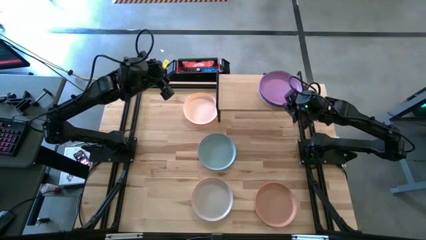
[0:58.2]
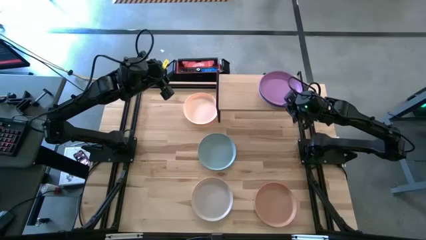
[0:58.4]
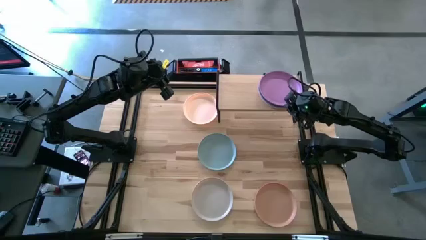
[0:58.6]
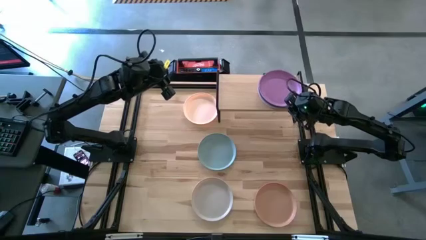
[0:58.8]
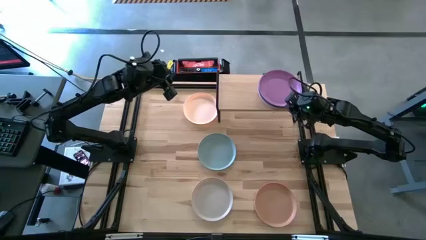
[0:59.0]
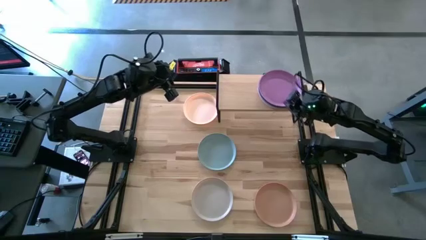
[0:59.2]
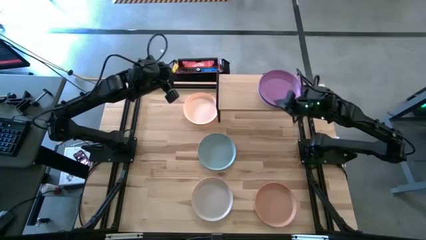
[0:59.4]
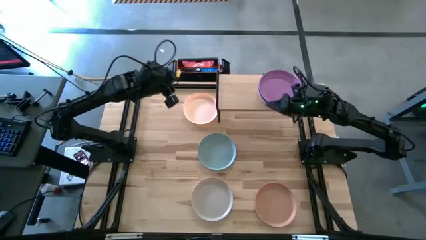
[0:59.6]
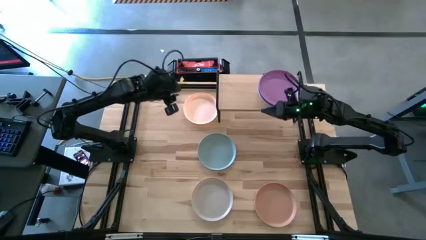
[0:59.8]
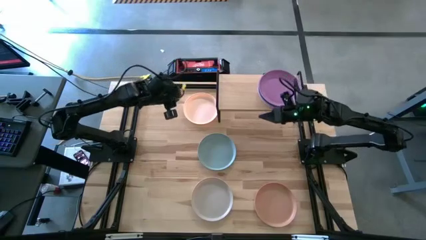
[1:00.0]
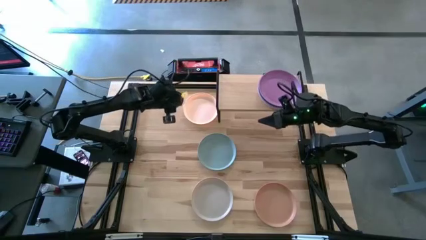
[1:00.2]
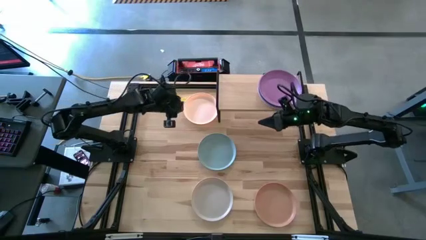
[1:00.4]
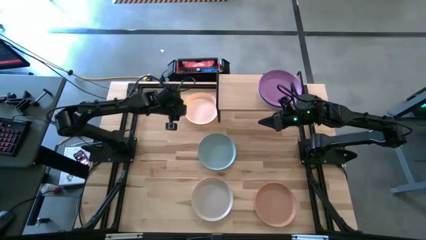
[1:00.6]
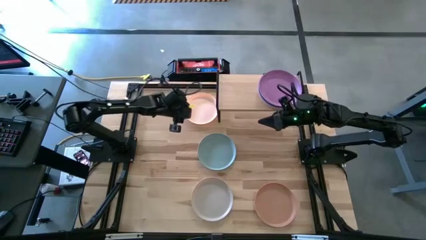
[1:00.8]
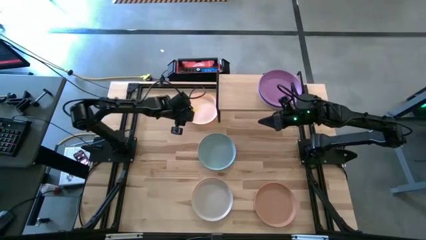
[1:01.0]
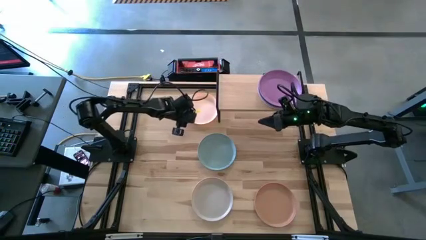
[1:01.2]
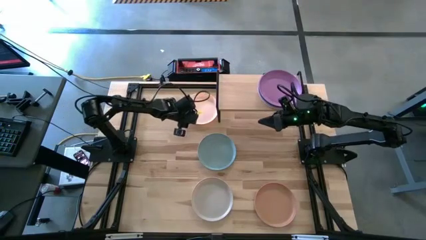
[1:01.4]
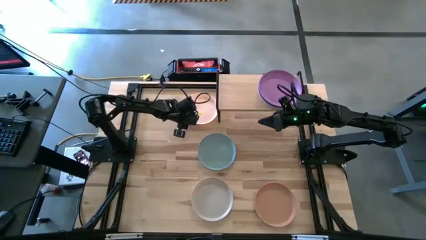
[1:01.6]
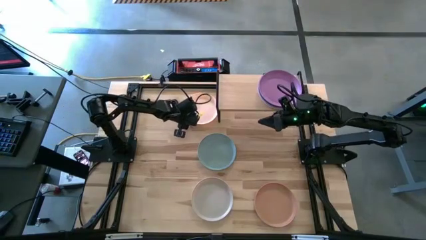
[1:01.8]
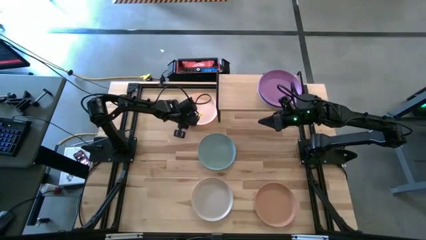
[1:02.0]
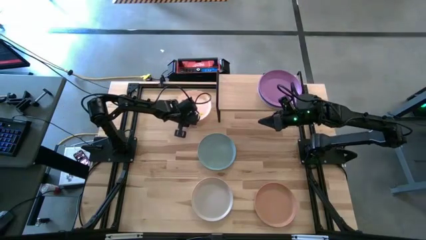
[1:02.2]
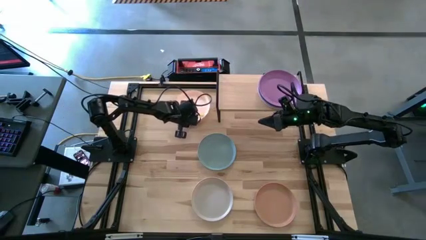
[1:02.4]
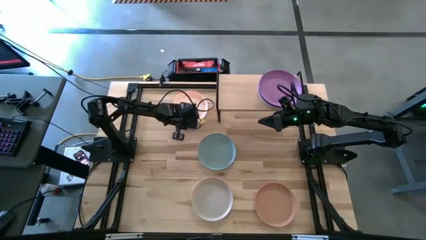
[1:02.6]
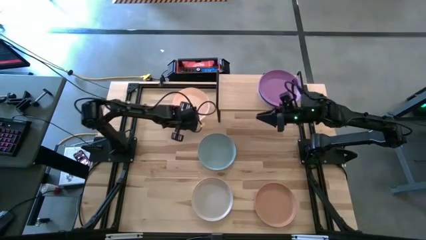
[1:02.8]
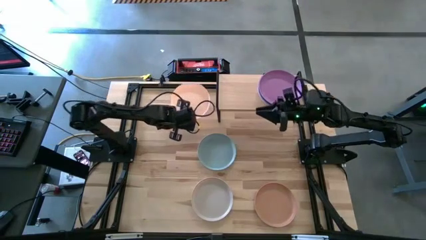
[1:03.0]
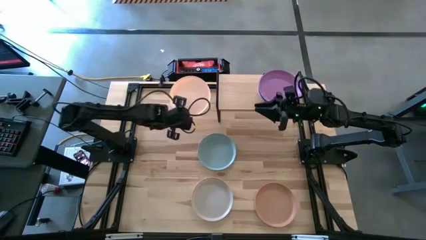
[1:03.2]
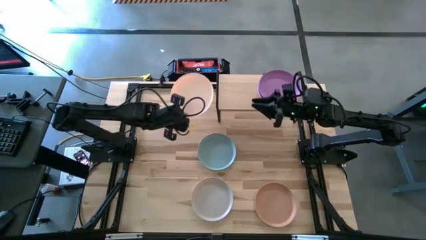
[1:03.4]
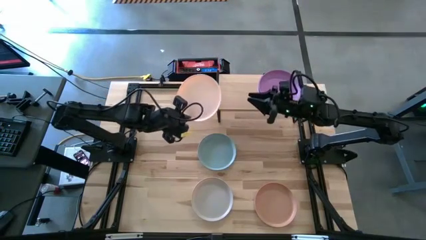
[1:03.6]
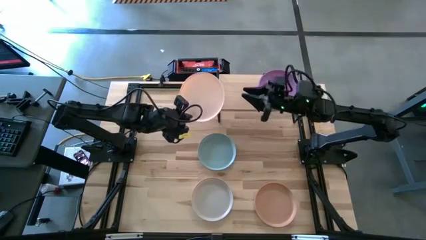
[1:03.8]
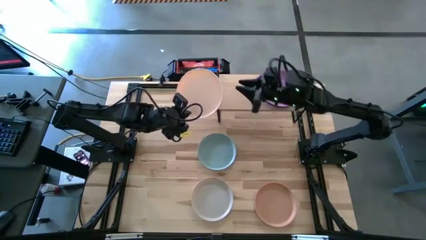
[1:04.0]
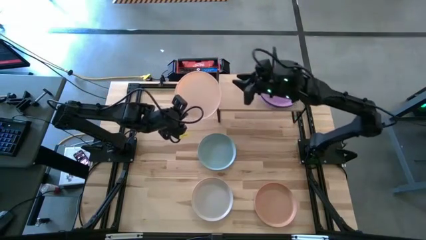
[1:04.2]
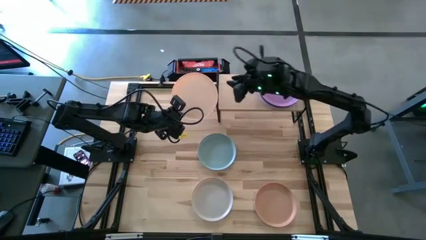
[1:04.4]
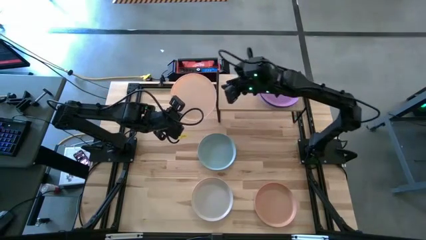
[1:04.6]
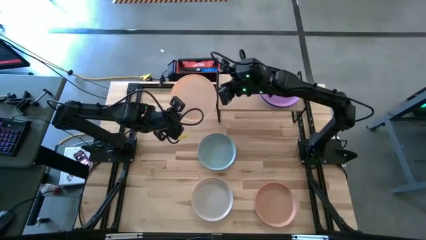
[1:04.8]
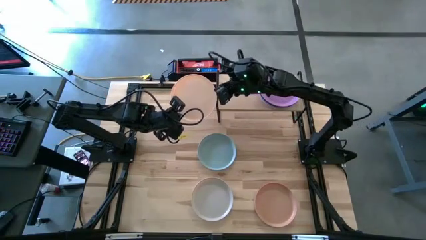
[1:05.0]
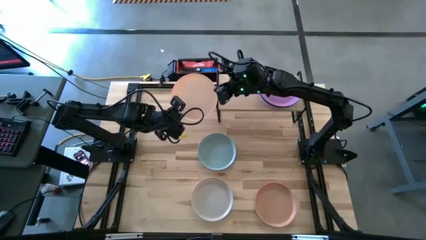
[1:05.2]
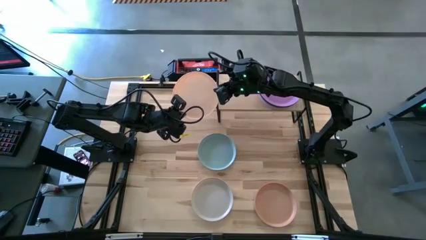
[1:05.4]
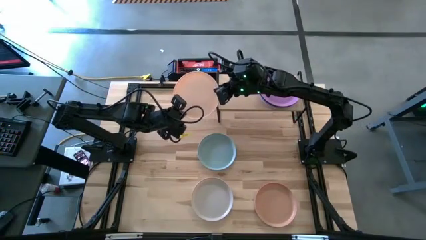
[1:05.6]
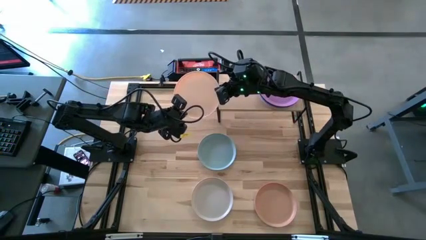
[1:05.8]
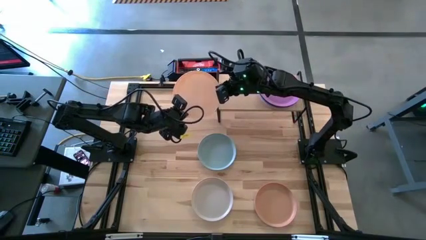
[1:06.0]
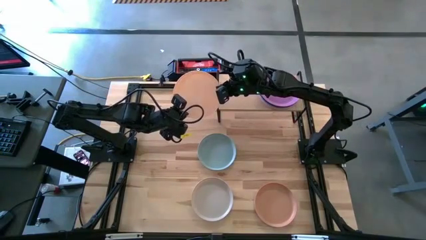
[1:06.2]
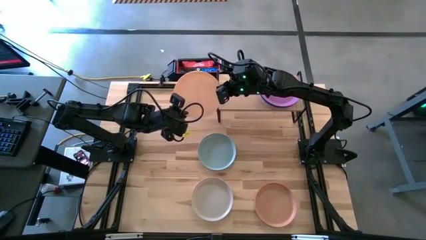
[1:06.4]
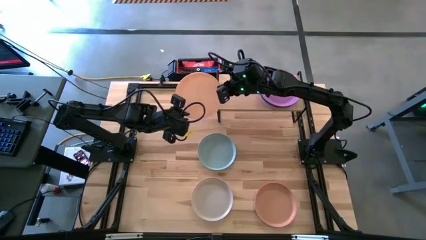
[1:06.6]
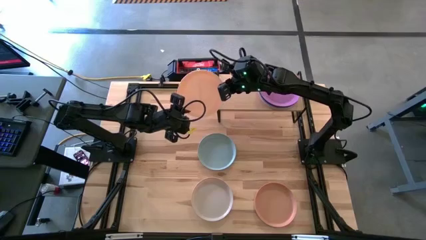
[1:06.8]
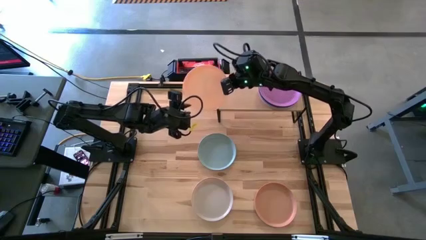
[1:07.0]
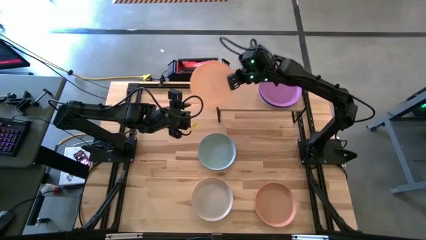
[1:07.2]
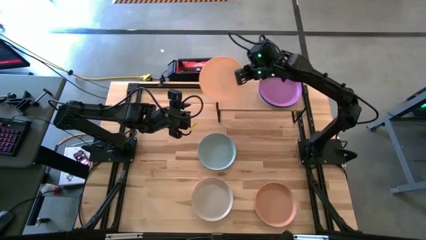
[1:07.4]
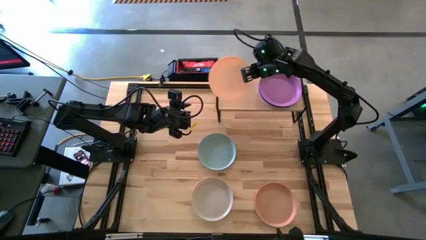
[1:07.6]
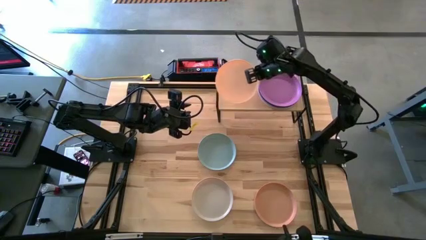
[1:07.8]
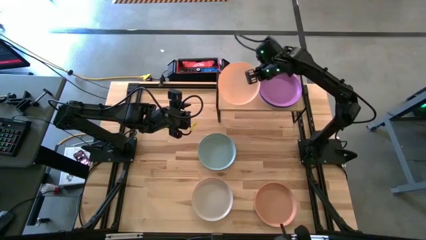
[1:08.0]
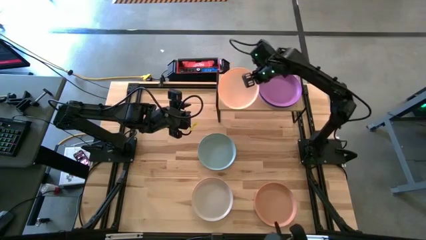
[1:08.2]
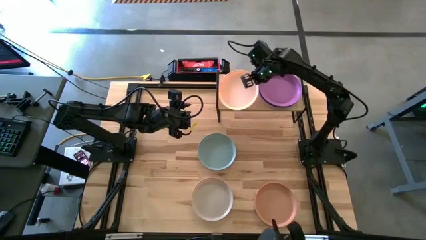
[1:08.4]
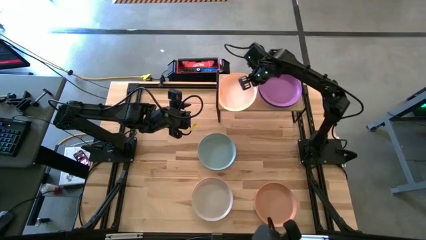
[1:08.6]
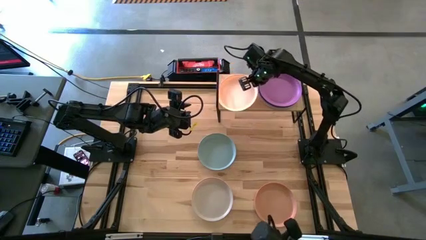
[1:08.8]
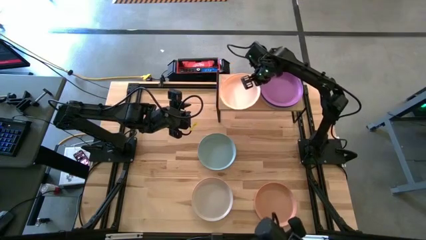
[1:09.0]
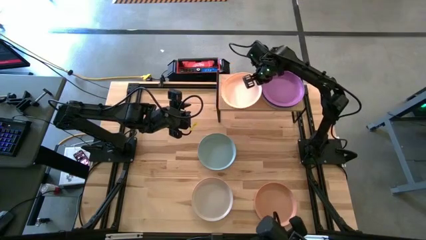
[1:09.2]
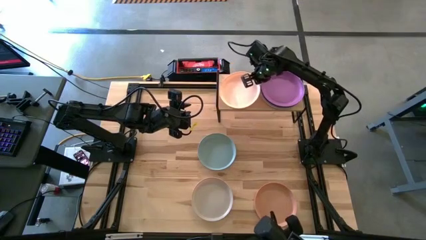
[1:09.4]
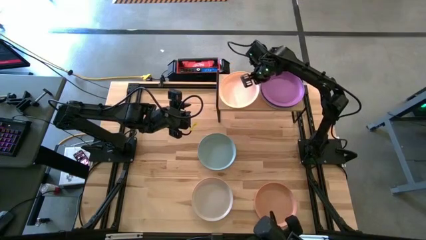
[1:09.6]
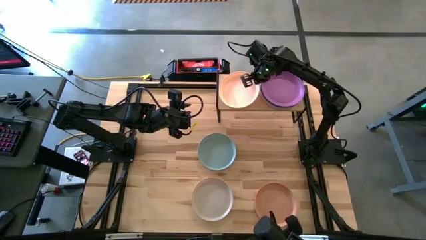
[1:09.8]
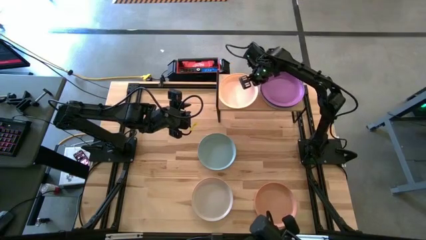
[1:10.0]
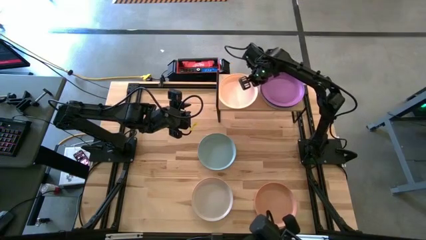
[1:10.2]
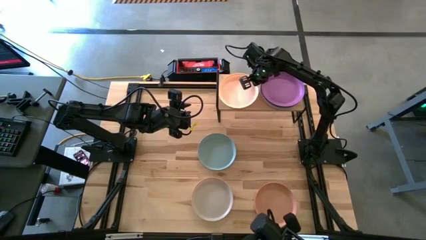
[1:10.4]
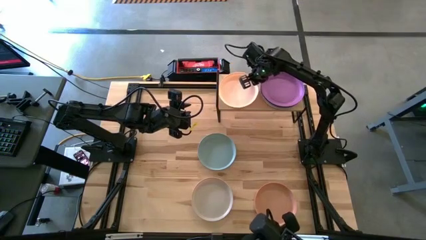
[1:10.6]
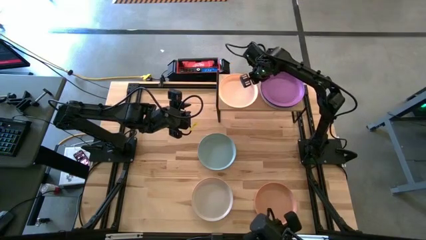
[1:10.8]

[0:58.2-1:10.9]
Task: Place and stack plates onto a shelf
Put the yellow plate on the shelf

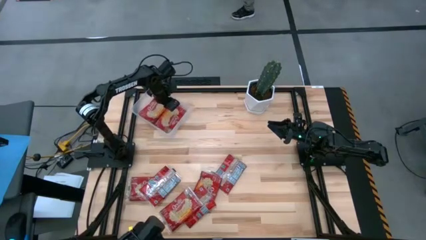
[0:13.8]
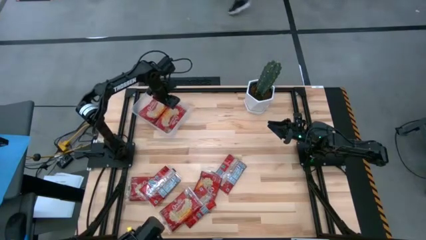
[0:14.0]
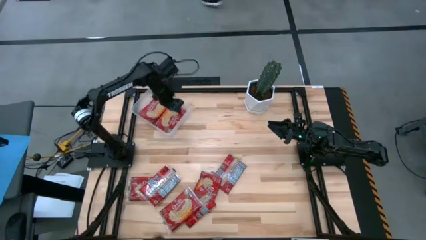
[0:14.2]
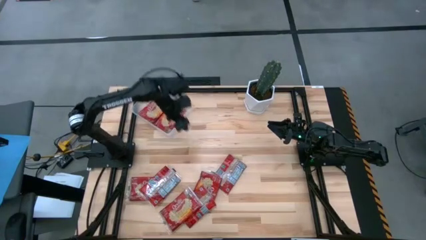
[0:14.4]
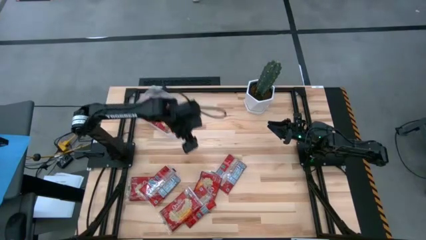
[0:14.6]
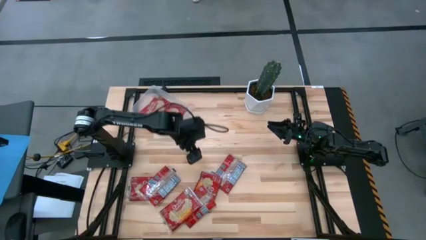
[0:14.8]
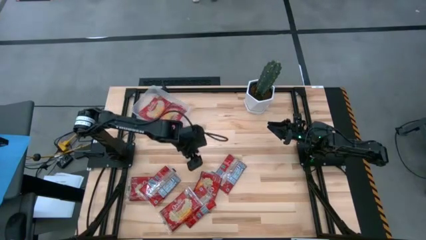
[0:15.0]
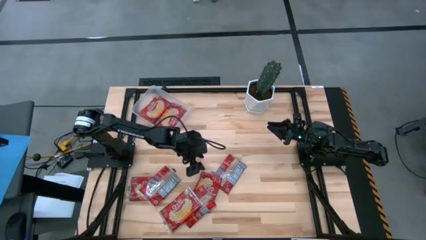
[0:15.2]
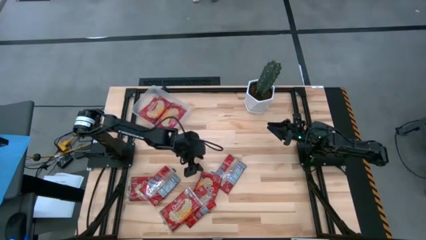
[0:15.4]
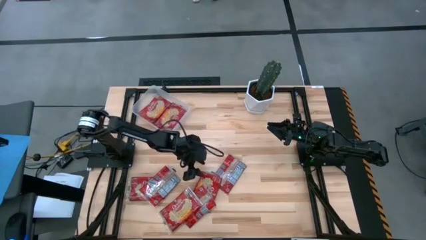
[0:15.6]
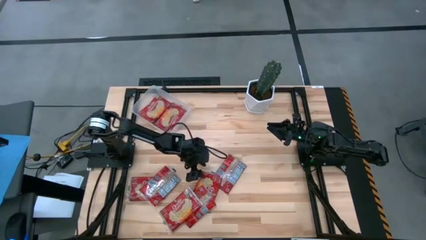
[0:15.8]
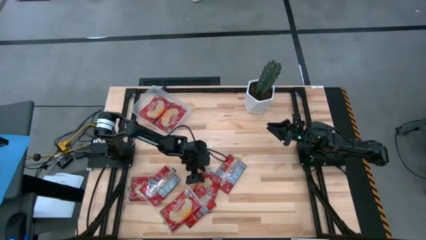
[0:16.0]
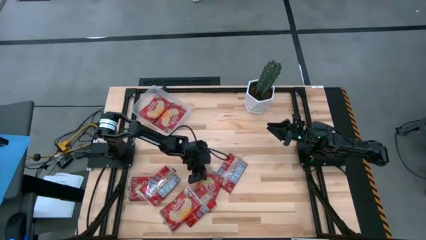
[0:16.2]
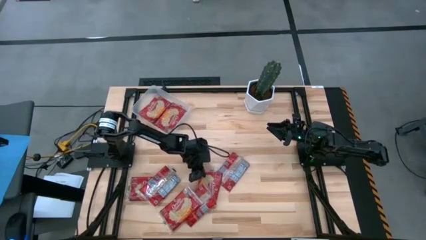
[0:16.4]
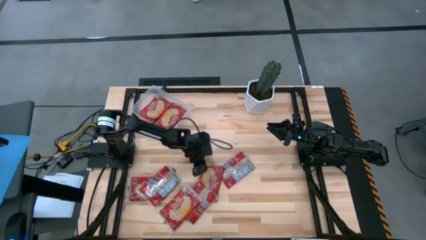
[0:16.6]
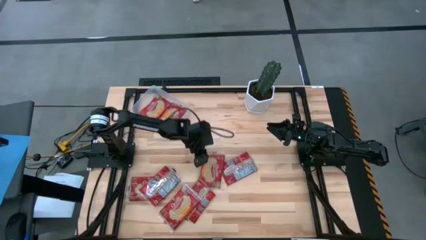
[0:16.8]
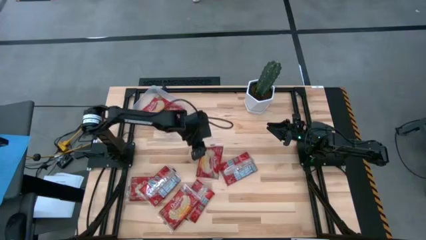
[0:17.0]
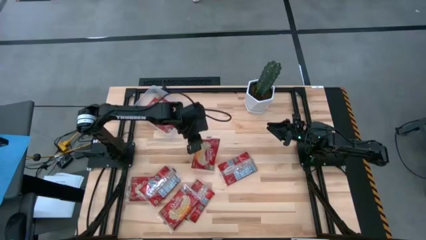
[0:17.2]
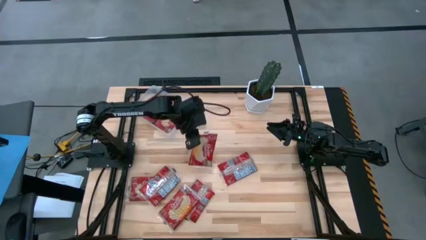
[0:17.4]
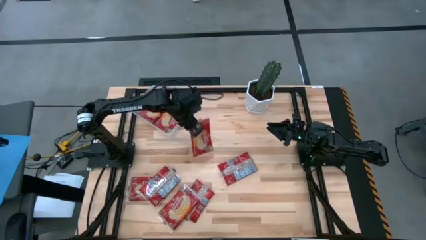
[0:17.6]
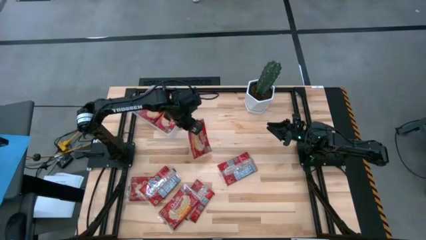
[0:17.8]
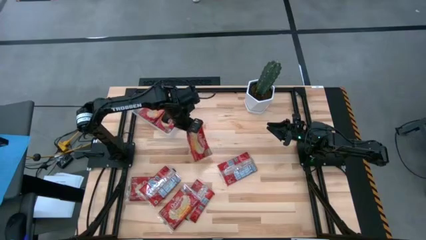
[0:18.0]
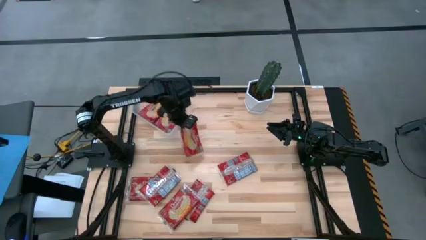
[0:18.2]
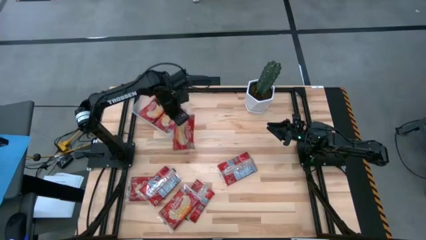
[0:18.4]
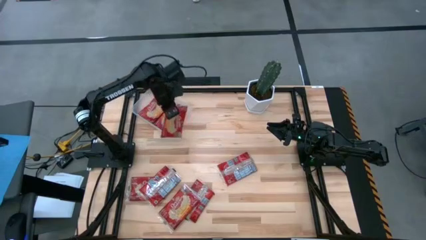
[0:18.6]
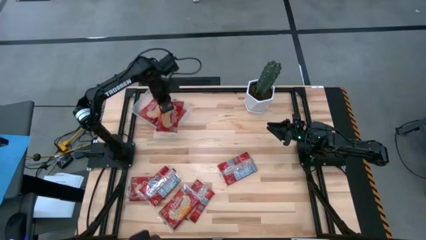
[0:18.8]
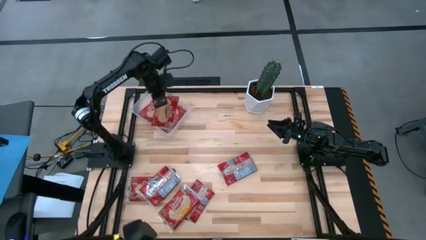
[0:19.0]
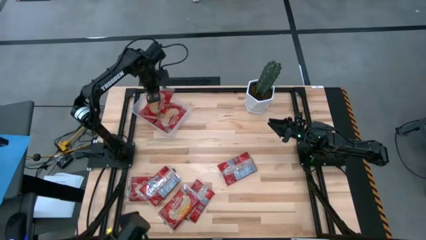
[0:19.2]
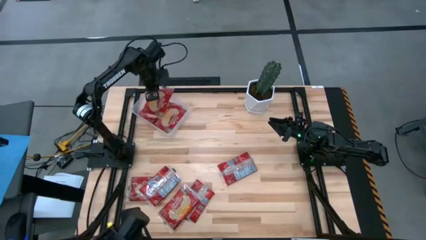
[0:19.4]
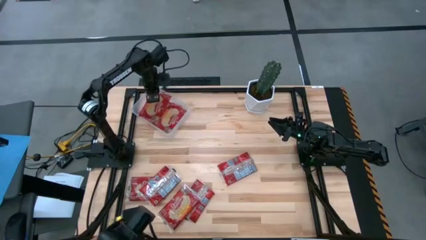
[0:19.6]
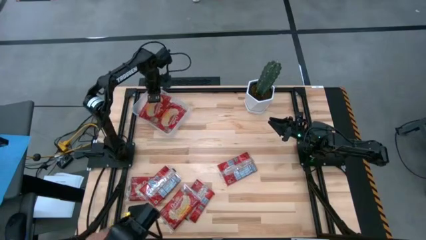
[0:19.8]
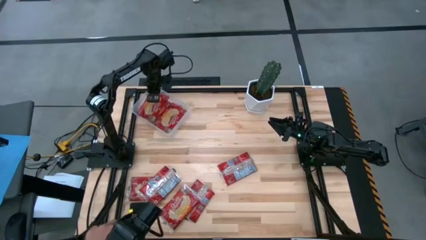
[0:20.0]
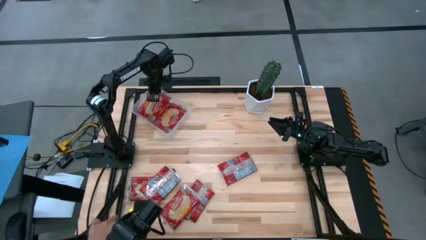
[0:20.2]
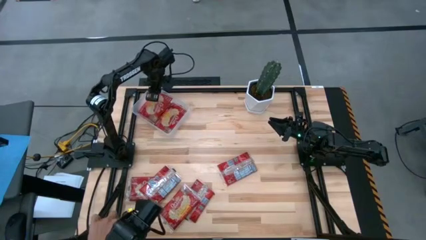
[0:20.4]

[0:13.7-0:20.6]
Task: Sort popcorn bags into baskets
Put the red popcorn bag into the transparent bin
